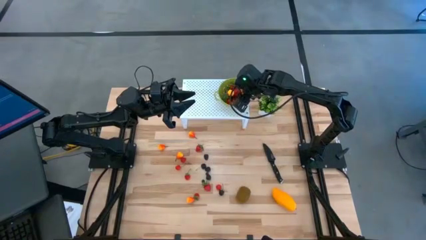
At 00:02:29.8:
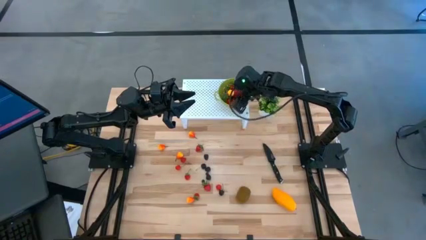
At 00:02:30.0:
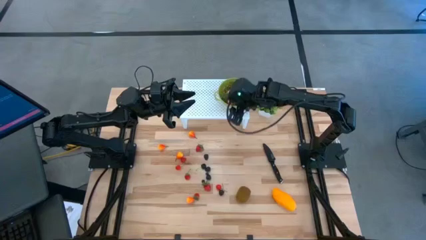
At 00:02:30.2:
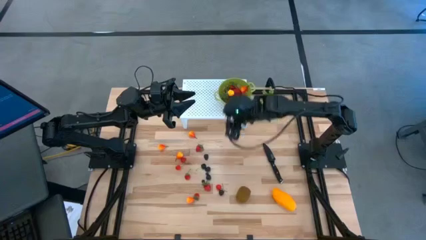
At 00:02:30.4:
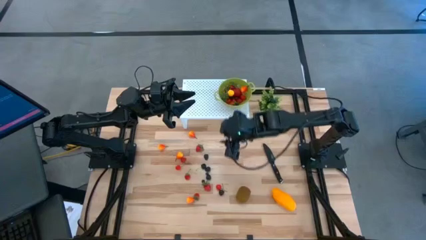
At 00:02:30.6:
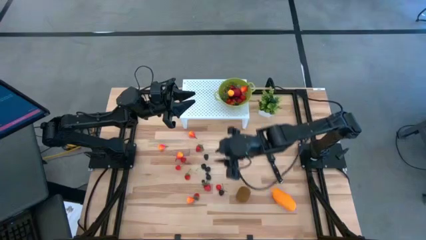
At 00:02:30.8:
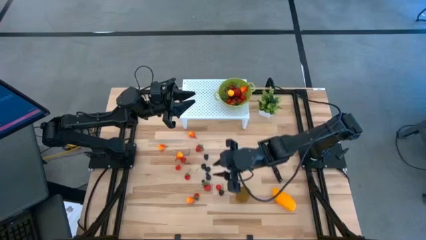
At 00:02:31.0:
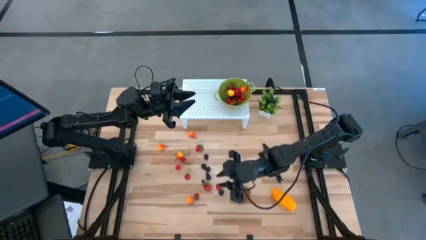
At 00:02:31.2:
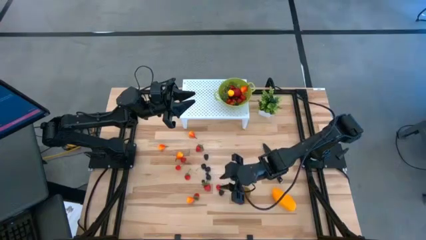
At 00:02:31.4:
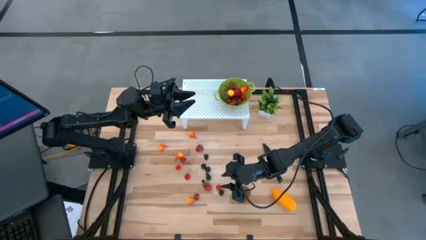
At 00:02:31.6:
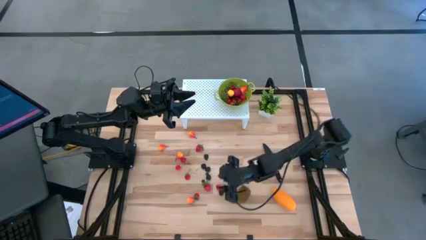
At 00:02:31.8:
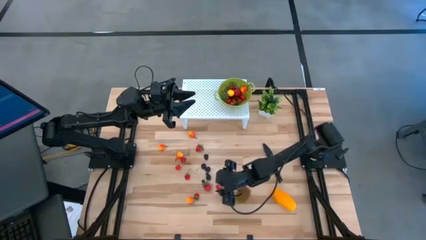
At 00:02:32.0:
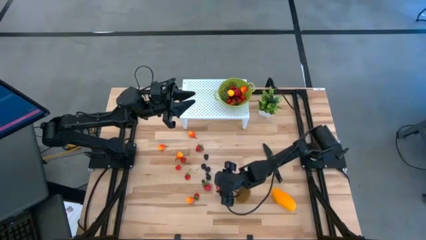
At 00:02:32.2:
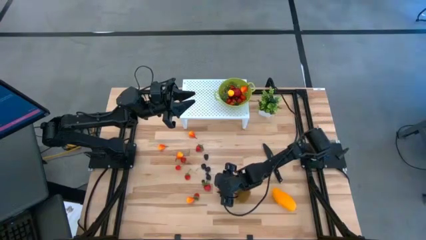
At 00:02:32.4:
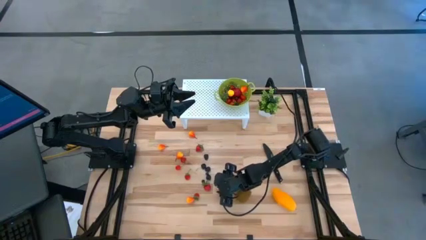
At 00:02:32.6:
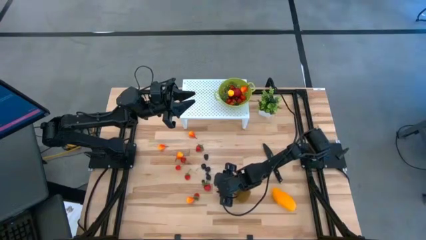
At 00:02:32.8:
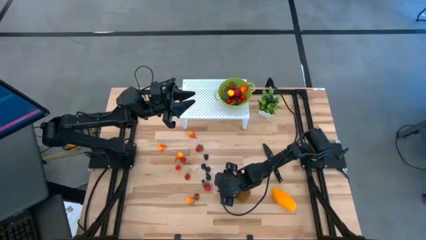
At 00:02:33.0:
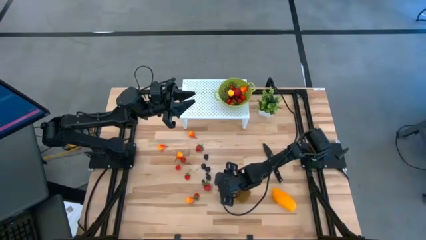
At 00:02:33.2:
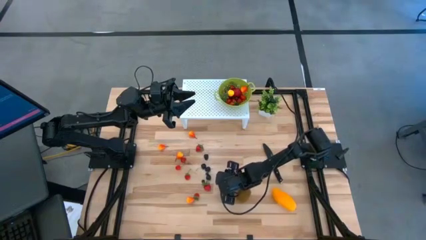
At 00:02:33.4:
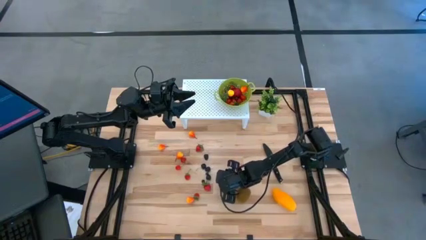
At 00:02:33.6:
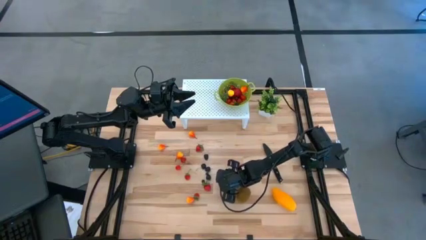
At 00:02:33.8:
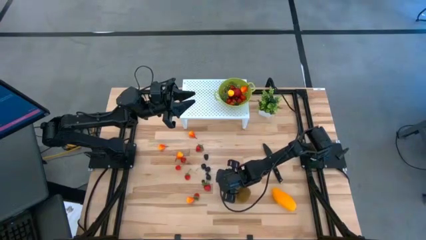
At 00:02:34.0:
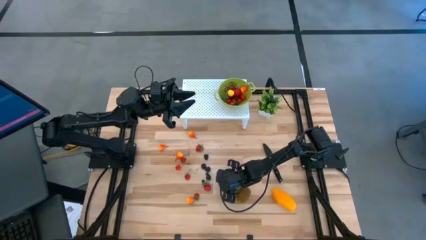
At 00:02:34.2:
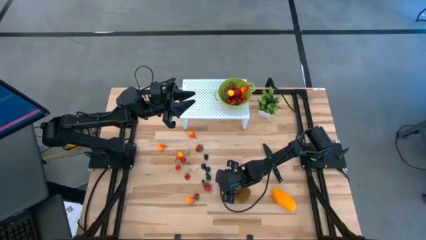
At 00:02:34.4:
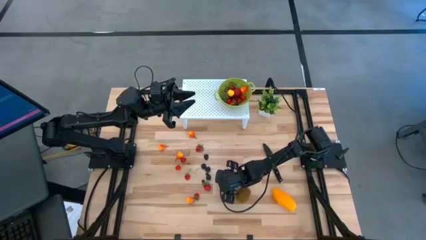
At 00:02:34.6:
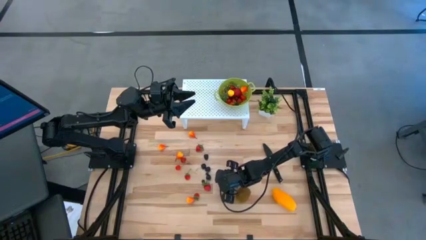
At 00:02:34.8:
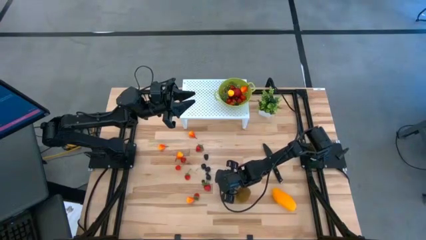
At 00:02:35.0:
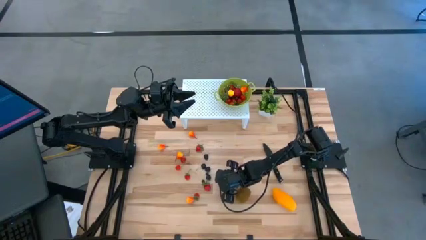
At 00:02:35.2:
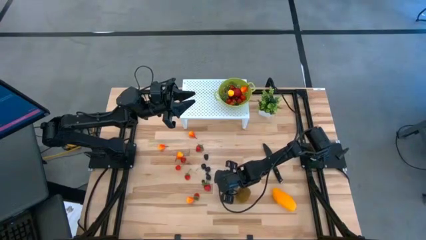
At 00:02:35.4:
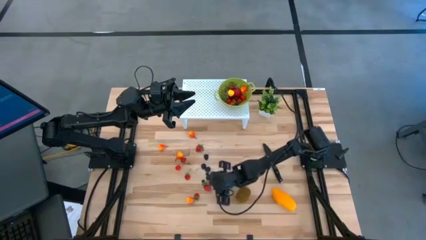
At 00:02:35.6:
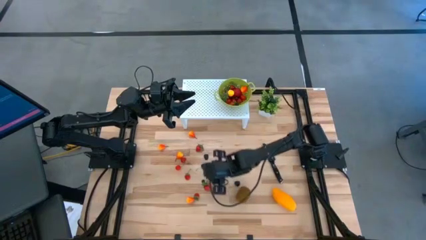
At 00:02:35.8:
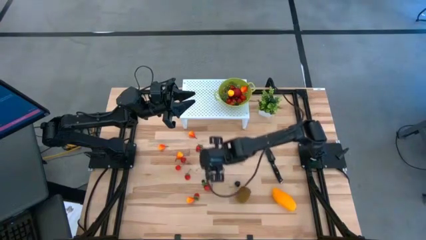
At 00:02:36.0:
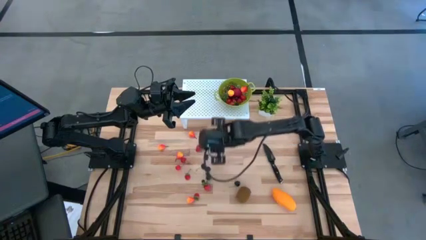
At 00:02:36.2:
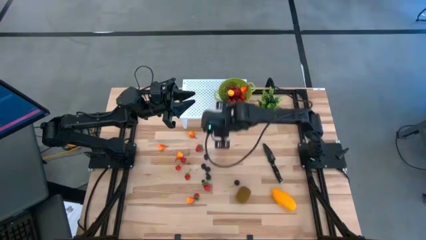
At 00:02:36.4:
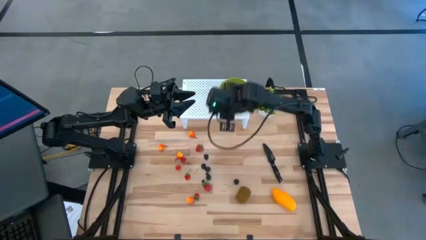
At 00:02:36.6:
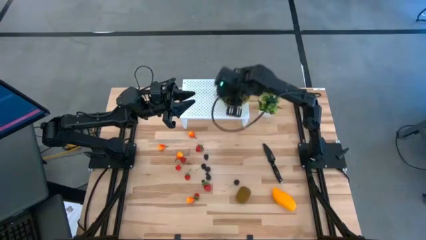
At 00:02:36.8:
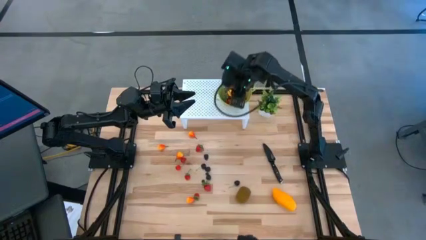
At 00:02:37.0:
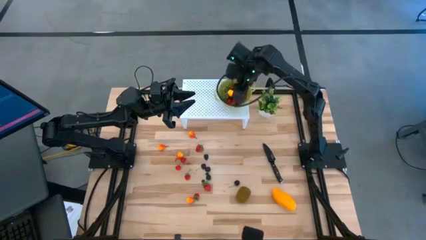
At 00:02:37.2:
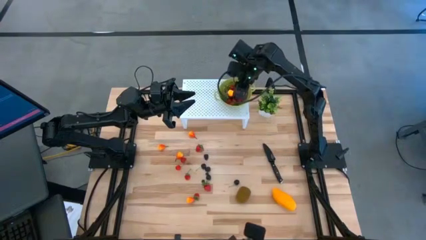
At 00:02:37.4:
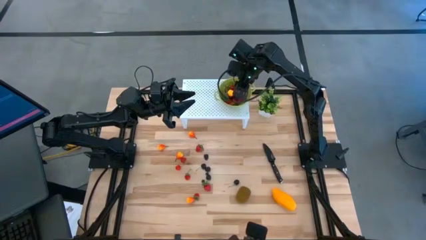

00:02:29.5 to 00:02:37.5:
Task: Pick & Place Fruit
Put the red cherry into the green strainer bowl

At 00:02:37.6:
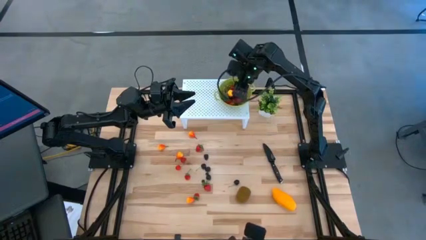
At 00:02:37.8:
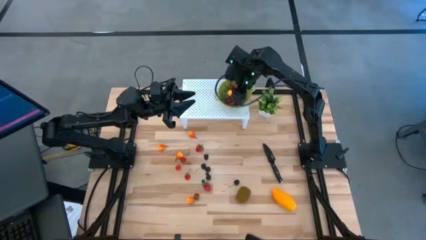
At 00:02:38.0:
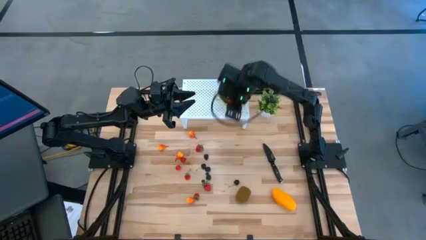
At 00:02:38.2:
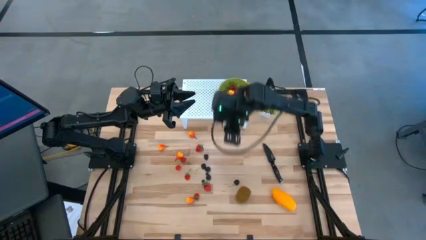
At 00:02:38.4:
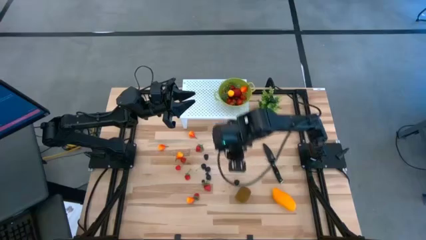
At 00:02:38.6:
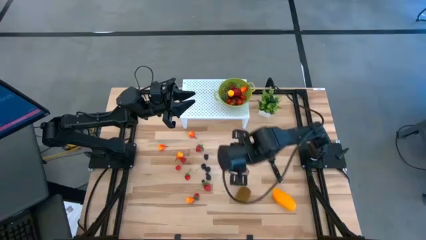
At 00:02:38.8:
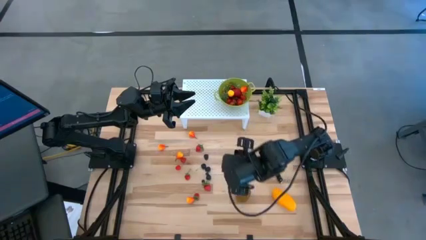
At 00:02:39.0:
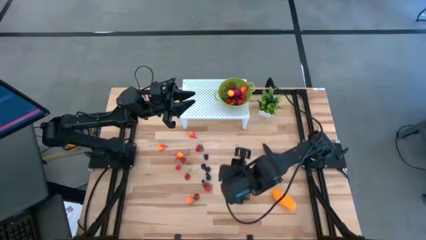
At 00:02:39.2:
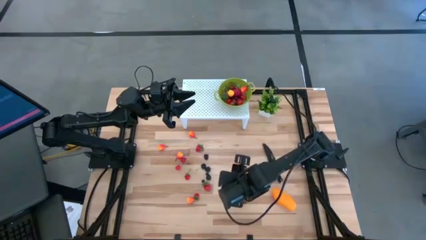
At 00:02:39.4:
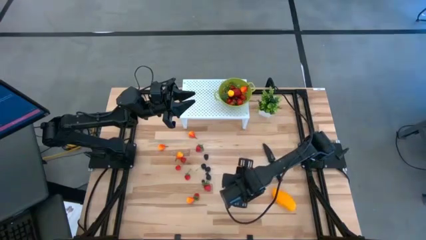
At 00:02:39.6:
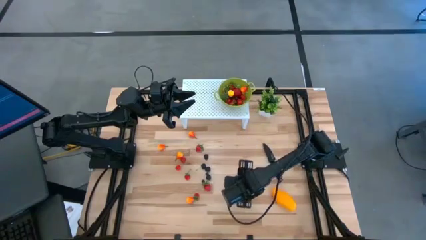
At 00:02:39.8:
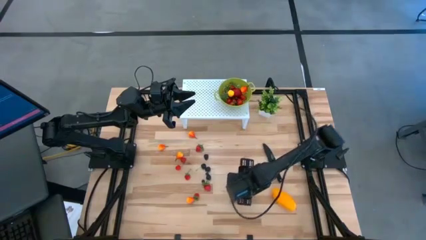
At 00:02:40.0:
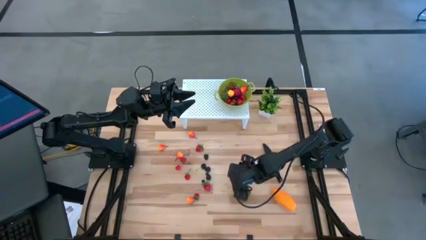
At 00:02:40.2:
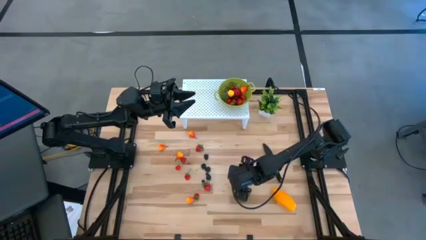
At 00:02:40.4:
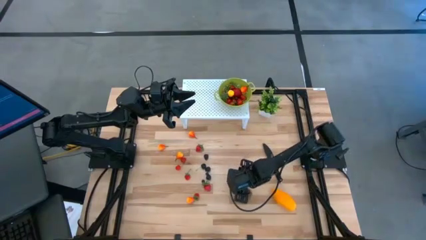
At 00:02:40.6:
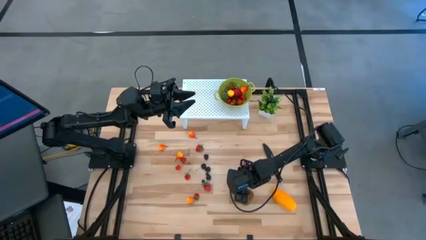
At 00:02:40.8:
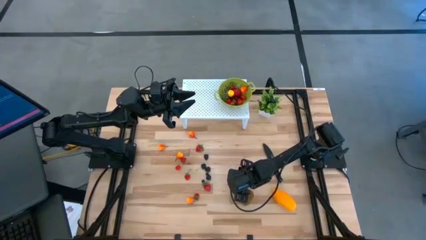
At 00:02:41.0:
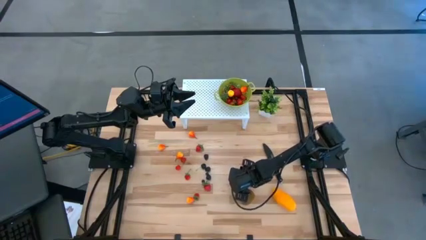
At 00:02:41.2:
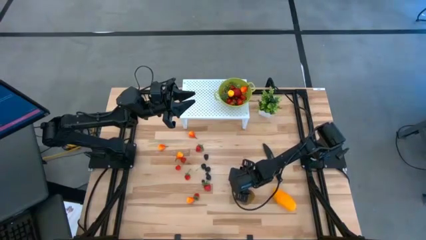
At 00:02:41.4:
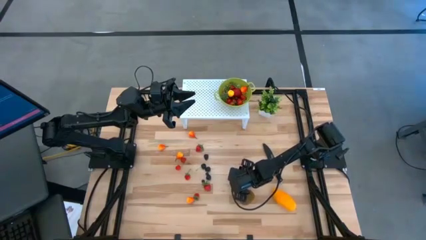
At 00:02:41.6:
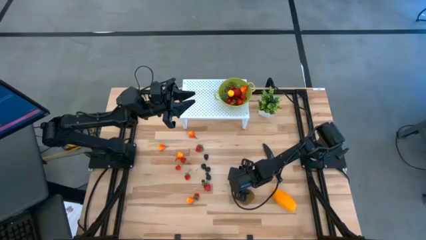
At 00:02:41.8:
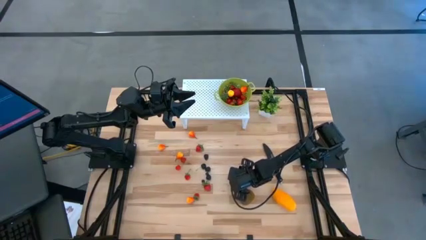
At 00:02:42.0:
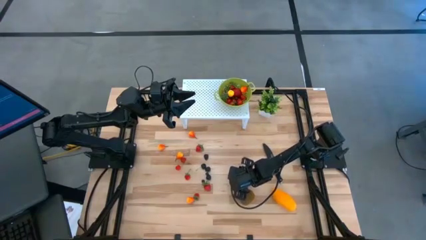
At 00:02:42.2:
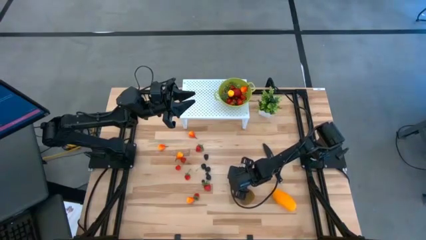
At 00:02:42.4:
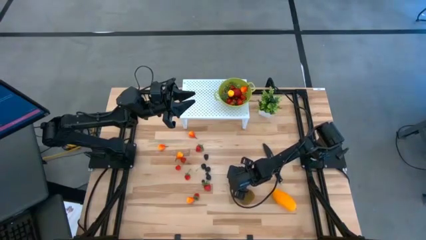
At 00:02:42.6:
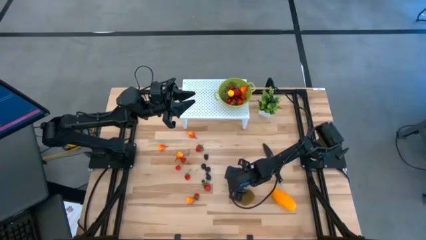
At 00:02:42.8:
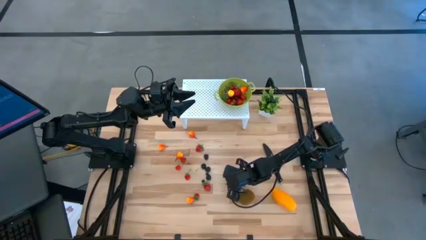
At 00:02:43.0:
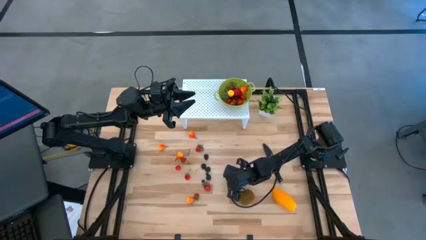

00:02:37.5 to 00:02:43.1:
Put the black cherry into the green strainer bowl

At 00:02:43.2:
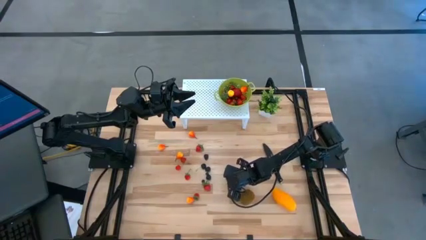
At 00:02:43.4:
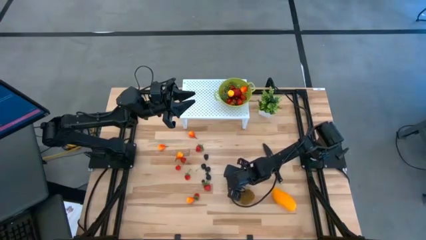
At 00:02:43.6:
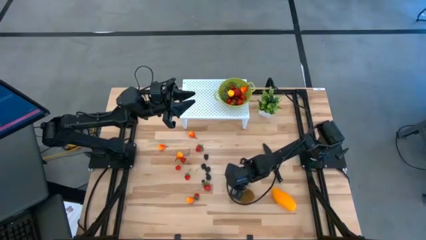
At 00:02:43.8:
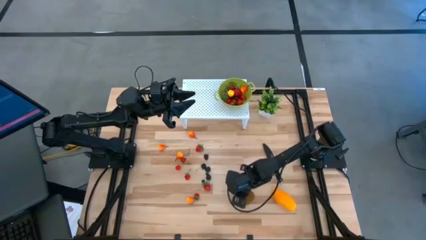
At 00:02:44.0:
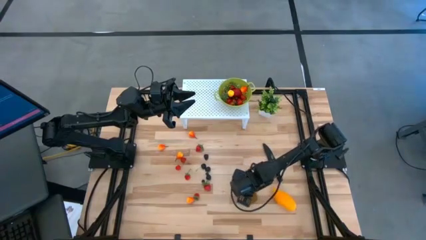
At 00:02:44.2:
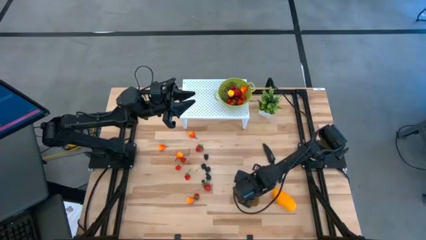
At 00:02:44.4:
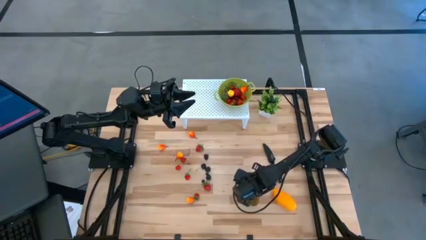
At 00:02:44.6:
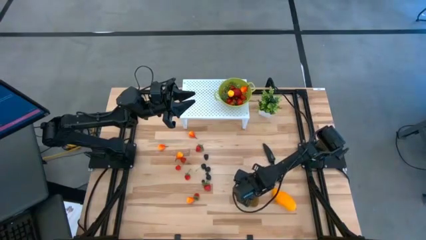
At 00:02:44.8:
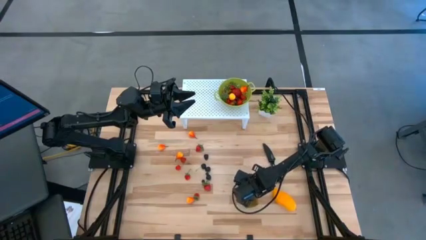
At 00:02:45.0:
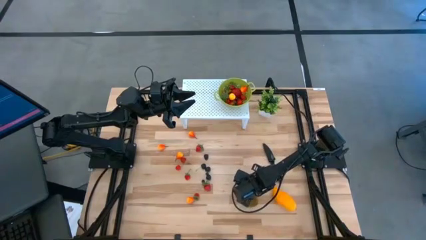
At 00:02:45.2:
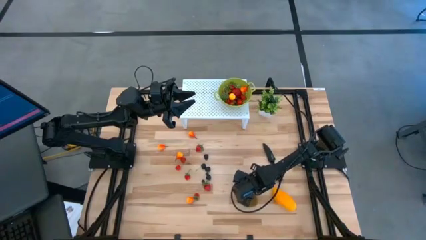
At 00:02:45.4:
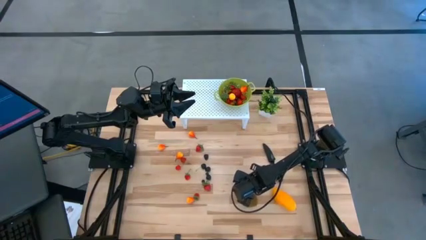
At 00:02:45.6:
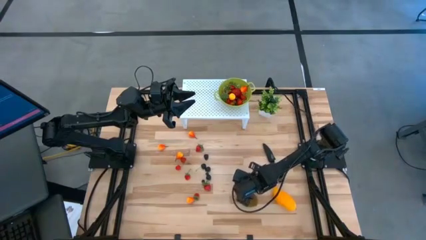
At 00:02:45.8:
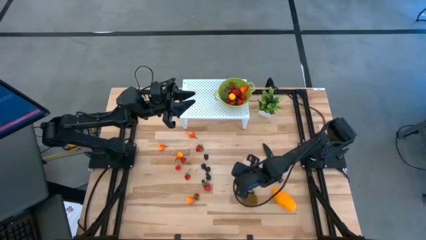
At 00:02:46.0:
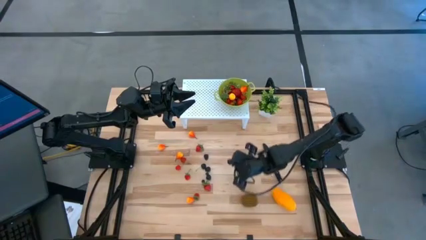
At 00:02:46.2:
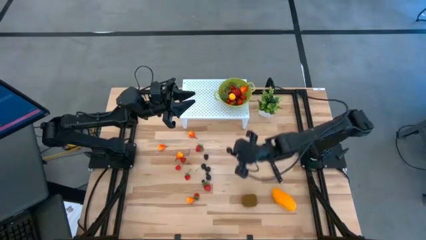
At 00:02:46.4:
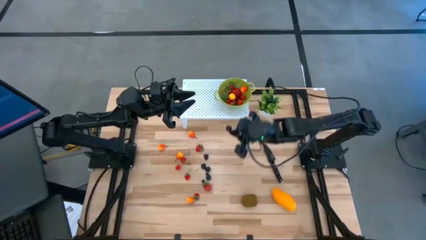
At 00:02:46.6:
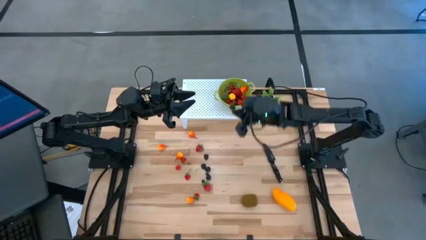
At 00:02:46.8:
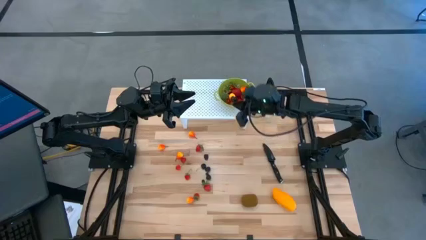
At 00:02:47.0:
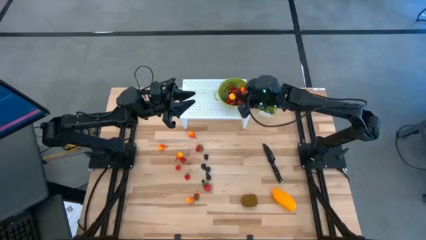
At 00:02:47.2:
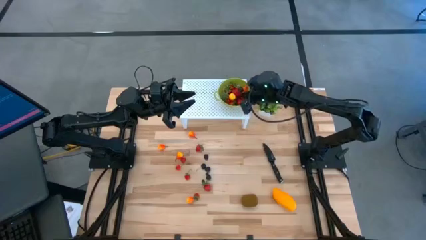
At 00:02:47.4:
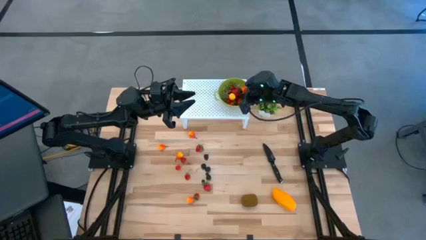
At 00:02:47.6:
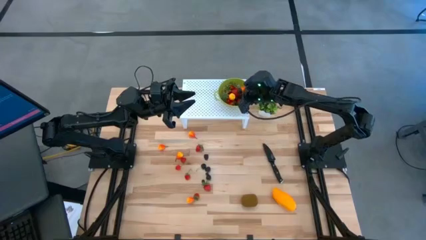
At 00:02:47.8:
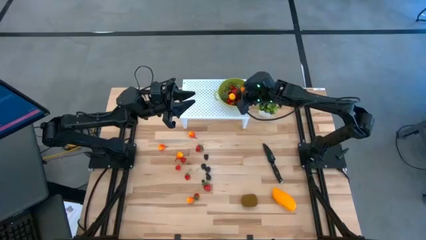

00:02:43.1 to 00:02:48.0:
Put the black cherry into the green strainer bowl
